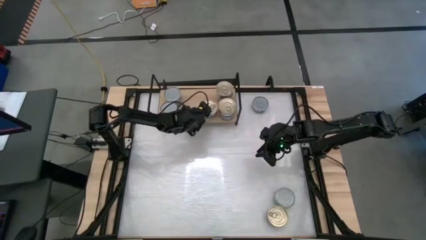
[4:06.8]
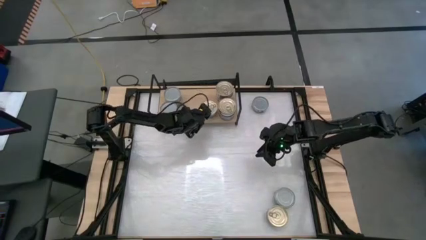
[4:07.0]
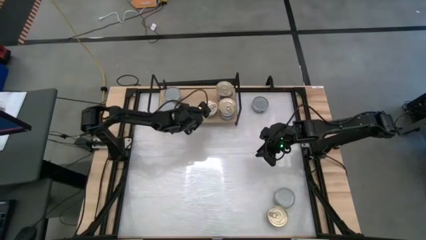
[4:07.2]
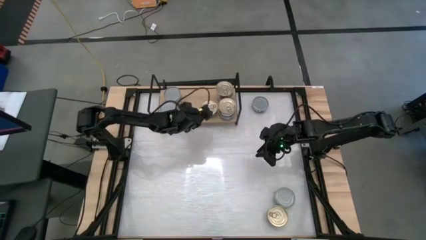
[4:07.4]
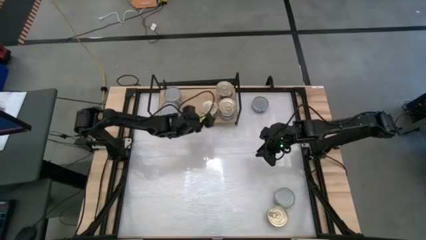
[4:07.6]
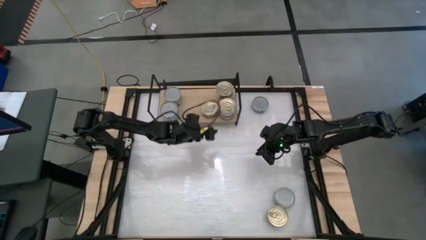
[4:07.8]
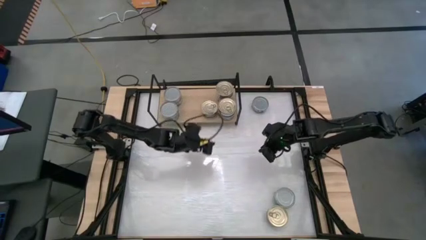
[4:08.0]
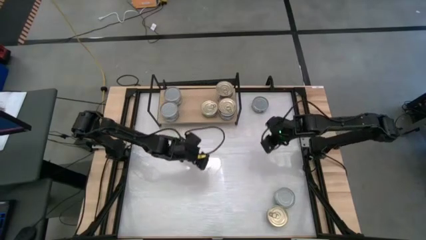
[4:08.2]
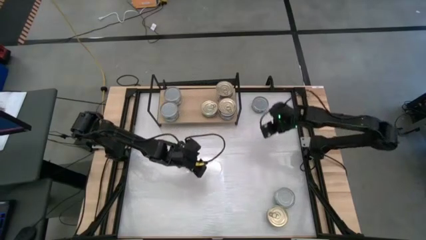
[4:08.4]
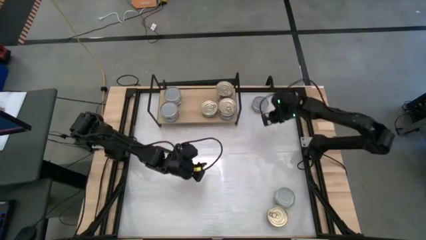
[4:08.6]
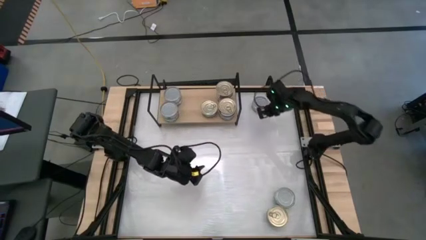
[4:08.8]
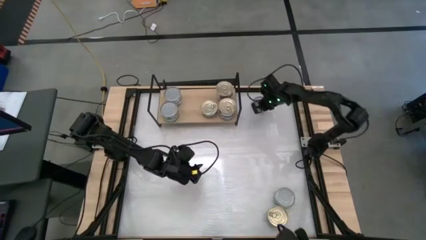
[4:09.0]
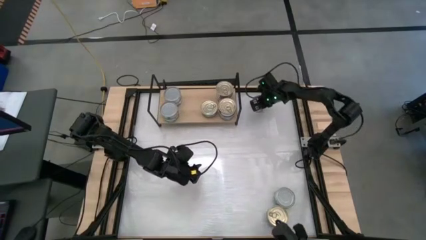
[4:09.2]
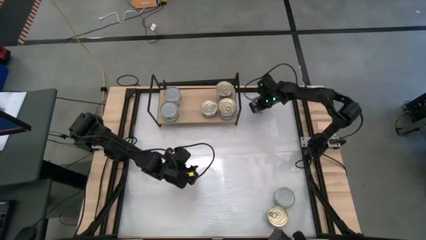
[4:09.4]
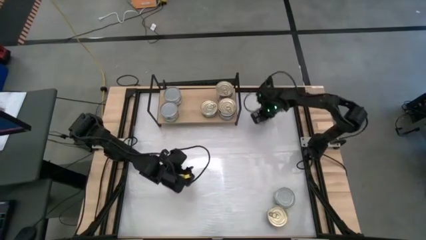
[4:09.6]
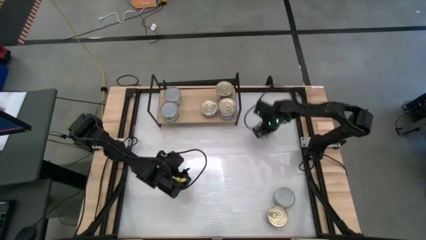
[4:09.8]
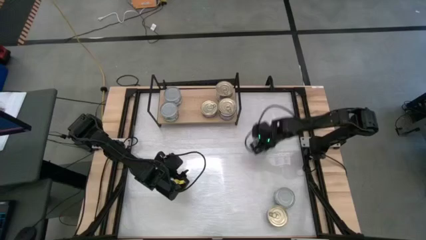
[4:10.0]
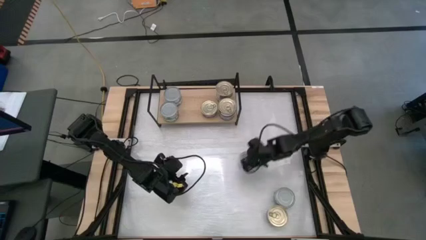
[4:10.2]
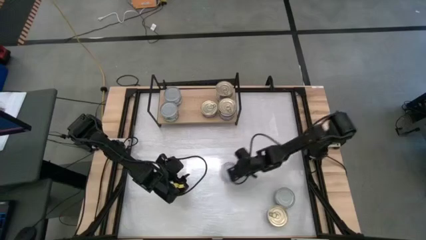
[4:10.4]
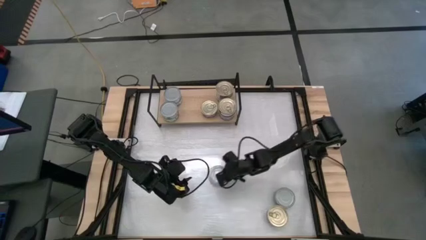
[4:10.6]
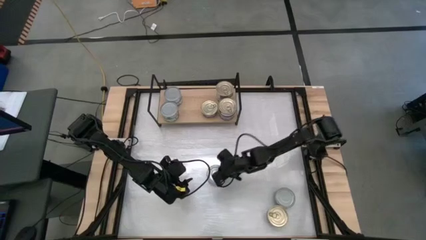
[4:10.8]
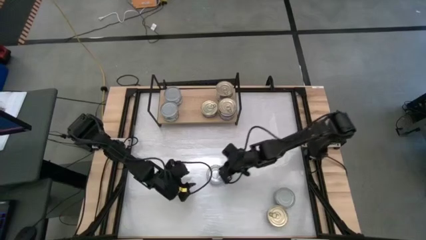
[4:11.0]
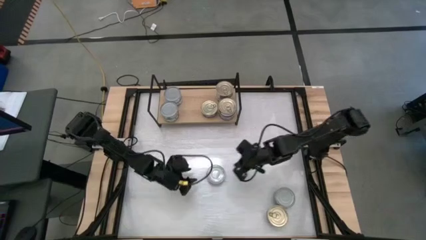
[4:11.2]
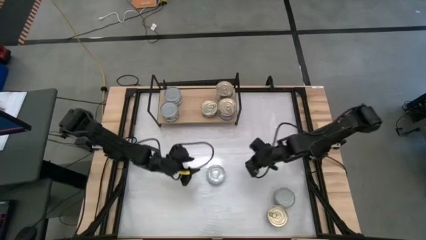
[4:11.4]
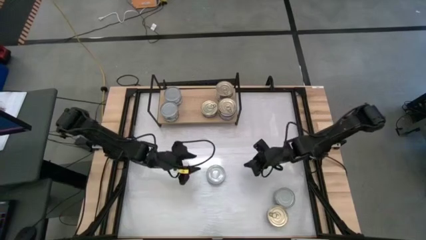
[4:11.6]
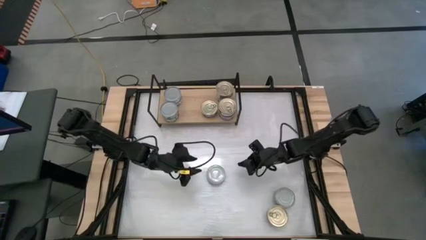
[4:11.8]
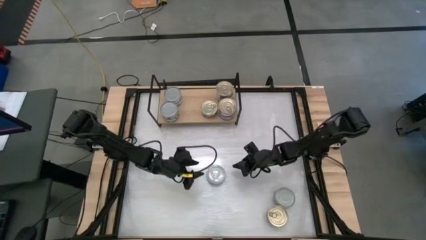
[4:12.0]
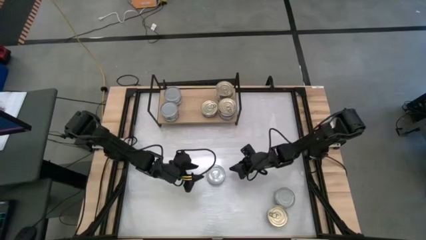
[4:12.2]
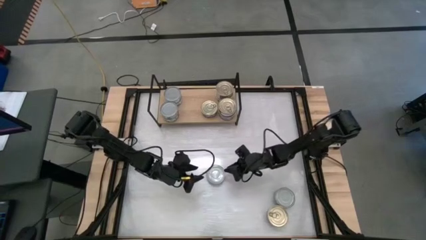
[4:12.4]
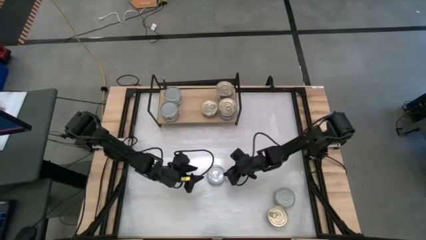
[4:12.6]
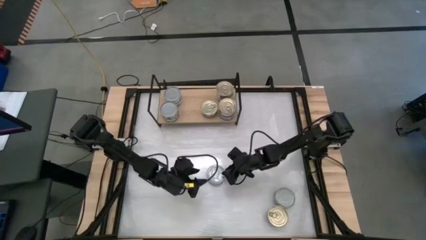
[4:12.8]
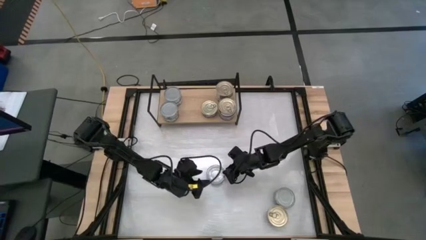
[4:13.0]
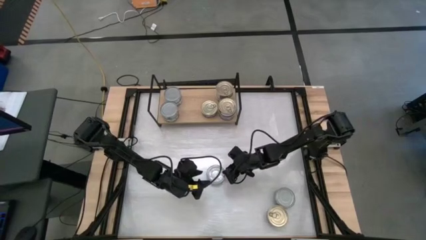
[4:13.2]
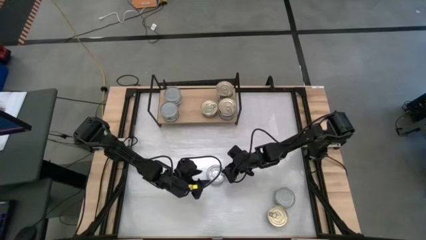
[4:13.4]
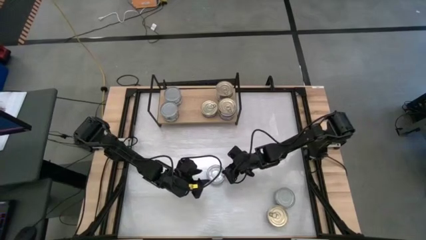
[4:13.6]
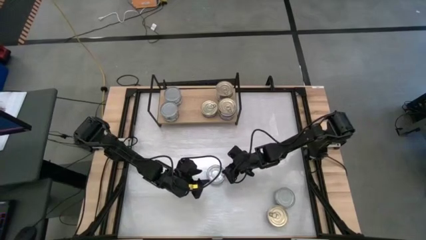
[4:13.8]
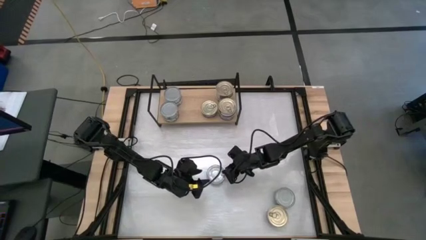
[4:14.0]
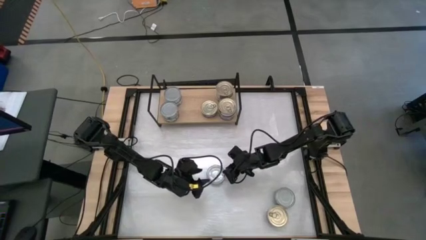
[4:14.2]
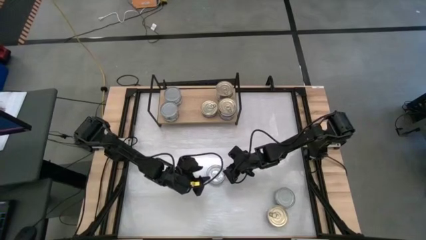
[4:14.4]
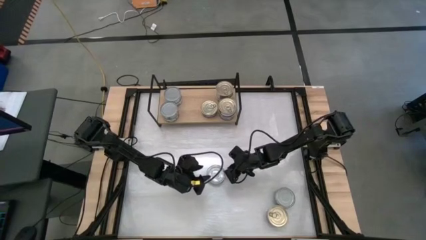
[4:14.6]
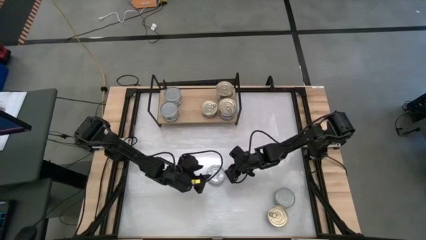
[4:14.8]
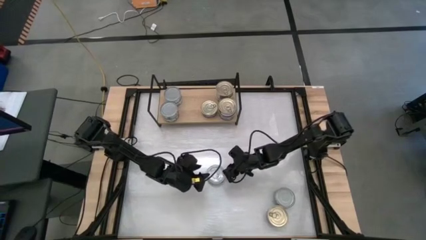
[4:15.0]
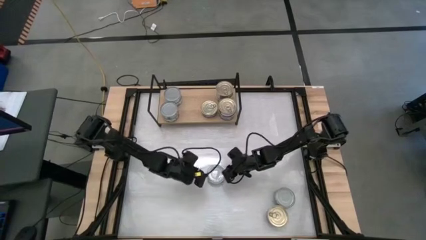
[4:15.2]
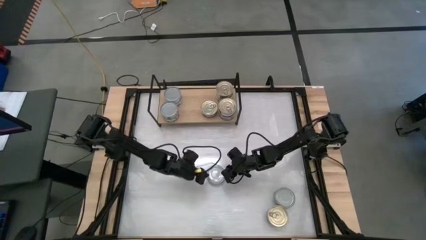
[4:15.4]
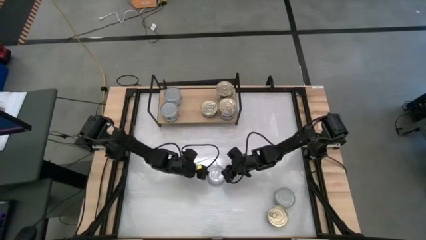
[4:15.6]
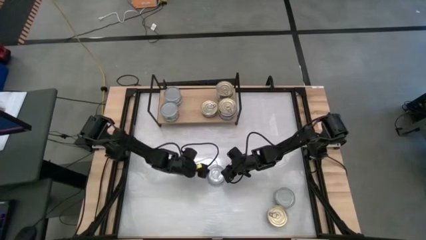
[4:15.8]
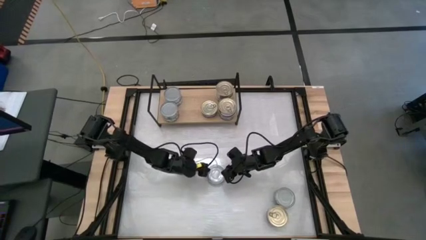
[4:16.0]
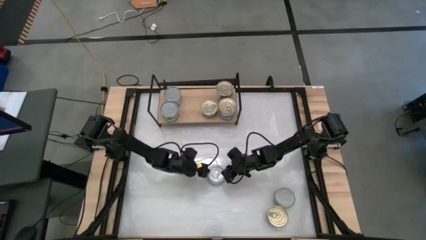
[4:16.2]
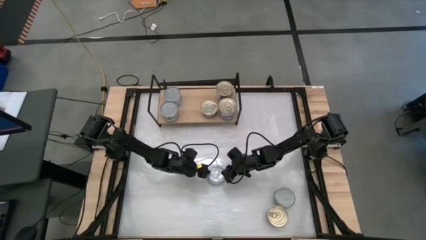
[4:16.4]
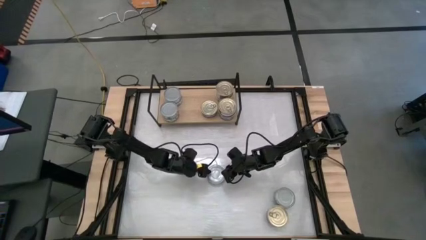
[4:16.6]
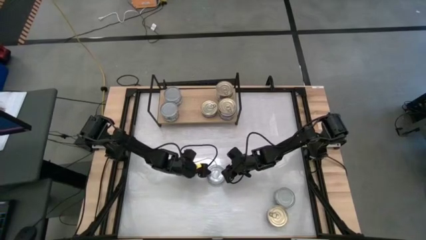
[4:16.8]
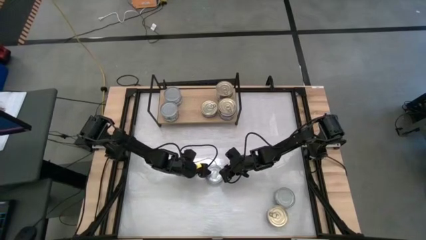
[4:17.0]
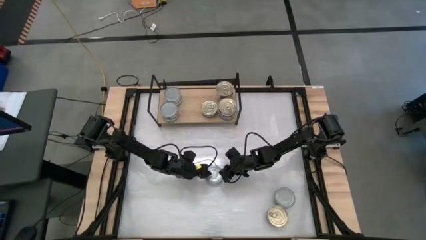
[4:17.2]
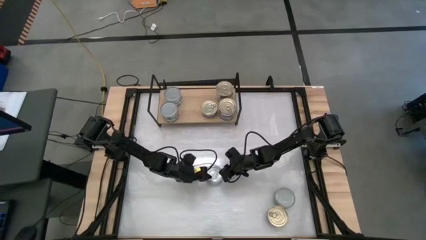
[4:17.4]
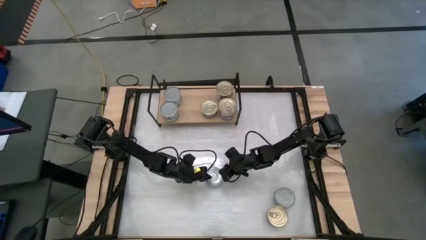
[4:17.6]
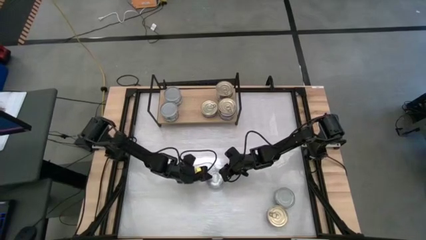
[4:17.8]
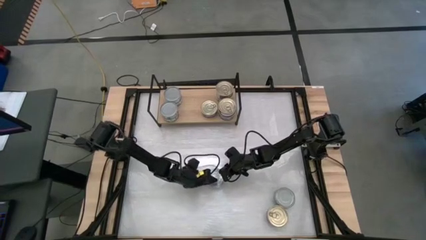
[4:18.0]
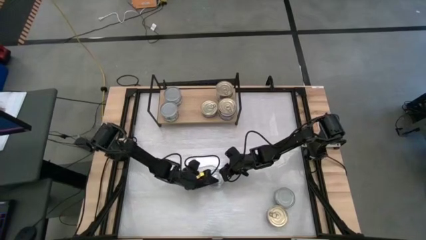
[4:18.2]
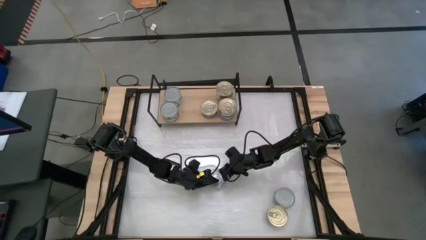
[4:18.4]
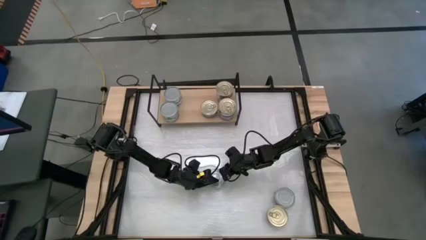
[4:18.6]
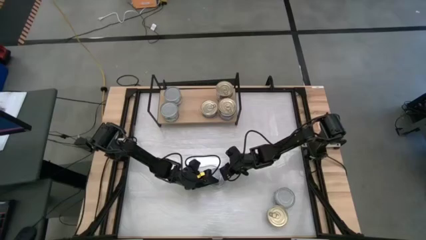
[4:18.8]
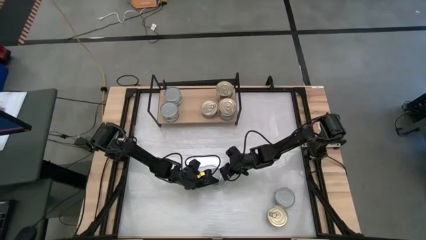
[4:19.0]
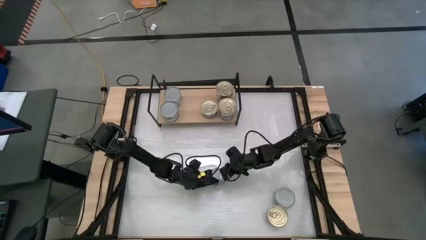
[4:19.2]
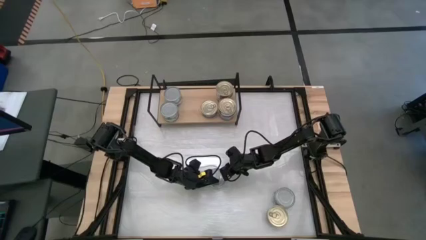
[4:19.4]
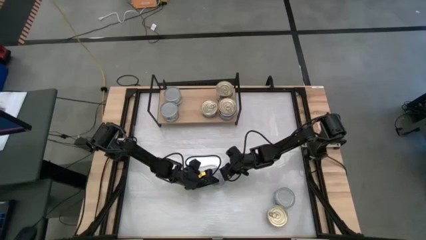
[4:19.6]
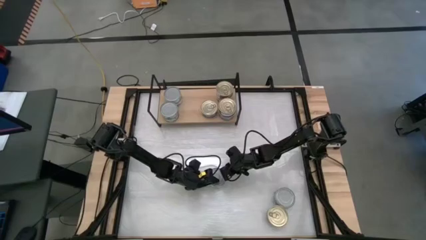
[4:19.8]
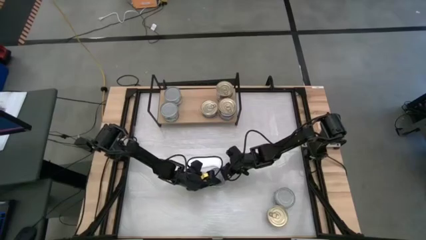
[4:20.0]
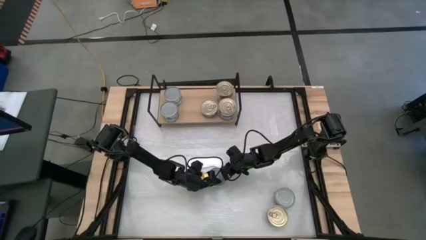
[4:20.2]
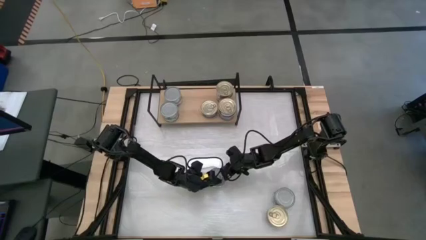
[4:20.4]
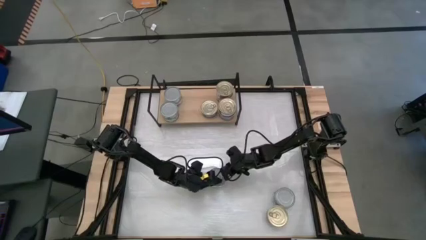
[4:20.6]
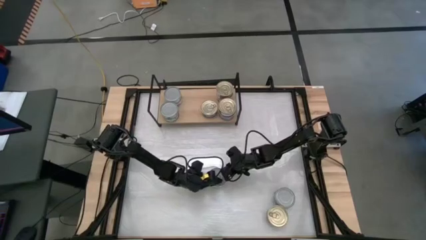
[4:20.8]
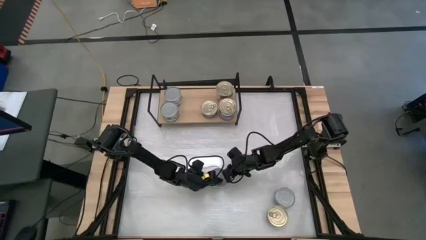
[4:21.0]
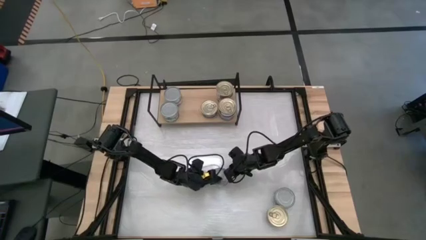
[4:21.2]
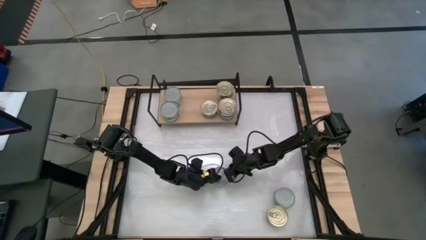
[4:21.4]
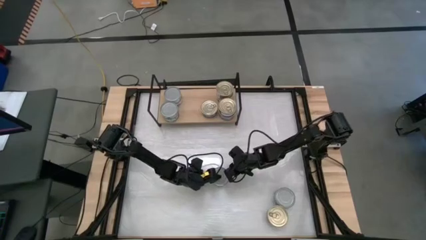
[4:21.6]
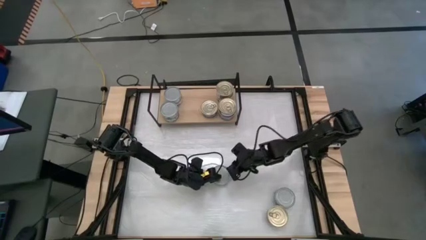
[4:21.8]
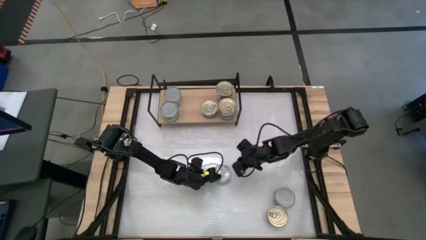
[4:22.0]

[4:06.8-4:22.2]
Task: Stack canned seafood by type on shelf
Put the green tuna can on the shelf

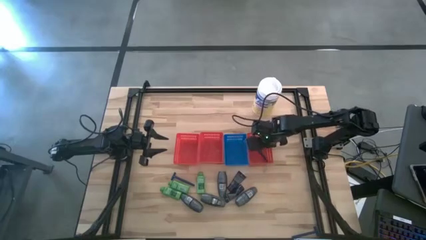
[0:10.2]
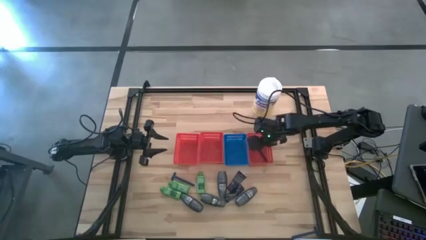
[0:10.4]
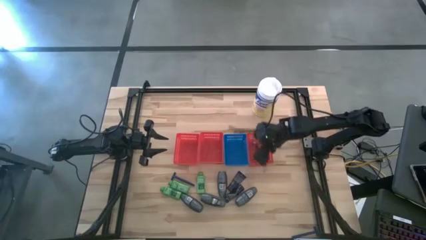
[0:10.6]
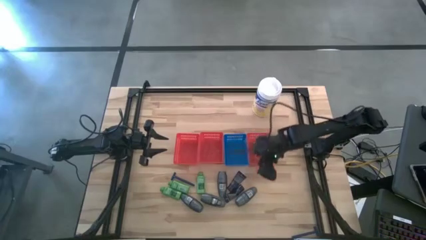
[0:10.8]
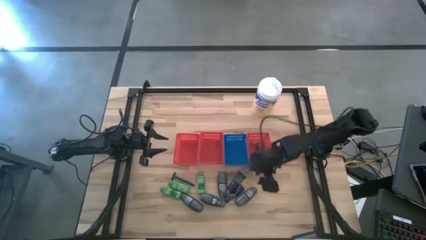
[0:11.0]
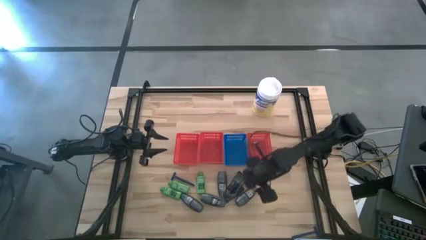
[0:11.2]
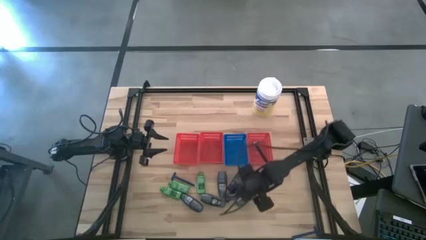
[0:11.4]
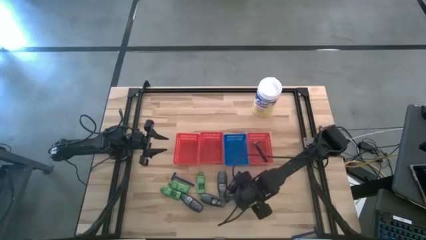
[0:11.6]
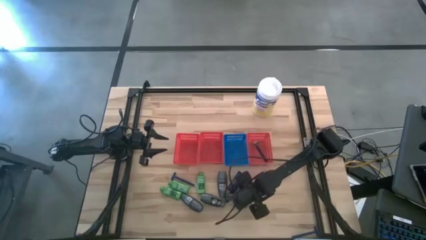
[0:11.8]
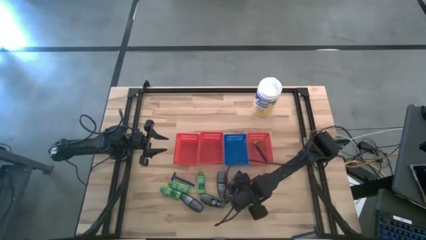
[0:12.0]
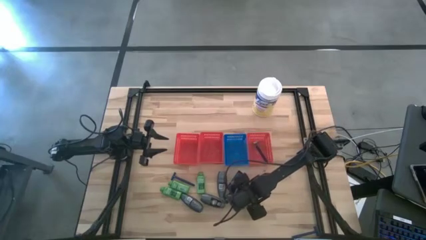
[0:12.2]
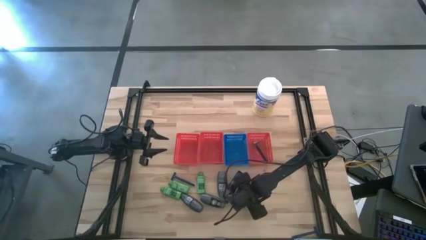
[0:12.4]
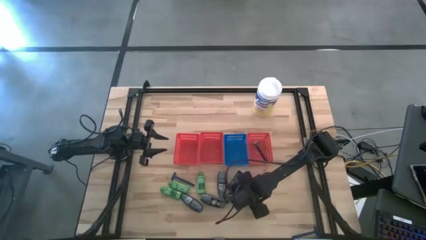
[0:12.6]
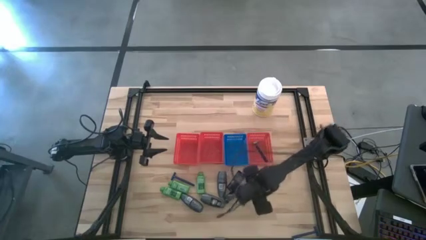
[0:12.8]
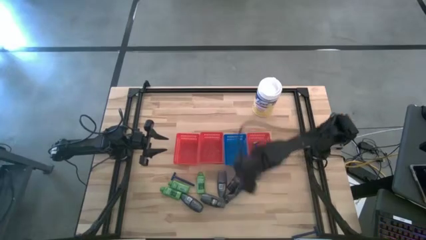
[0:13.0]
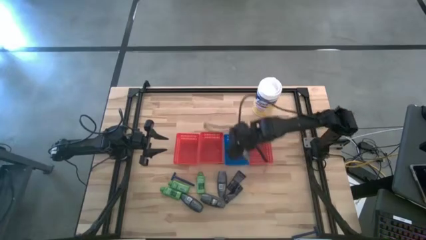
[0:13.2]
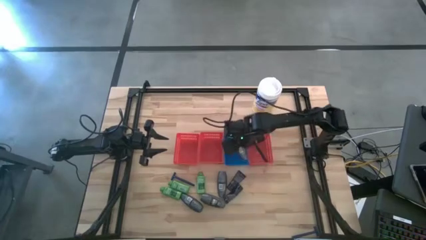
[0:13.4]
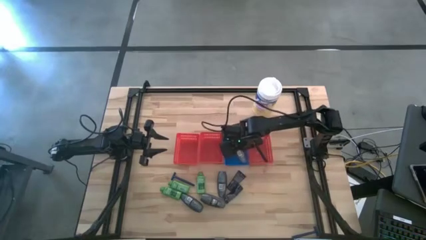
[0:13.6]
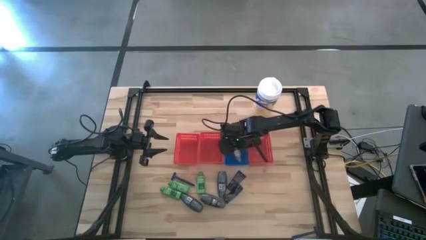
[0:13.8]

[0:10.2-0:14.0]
Task: Pick & Place Travel size toiletries
Put the deodorant into the blue bin
